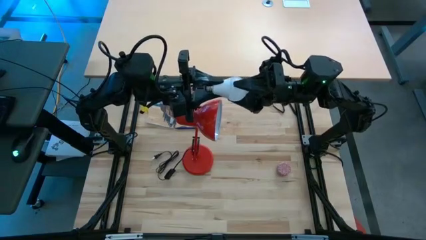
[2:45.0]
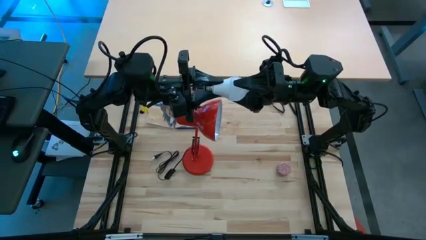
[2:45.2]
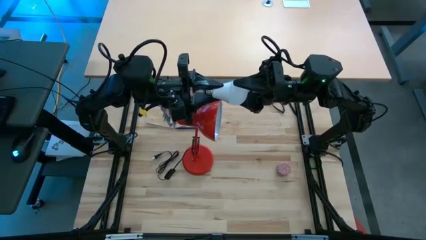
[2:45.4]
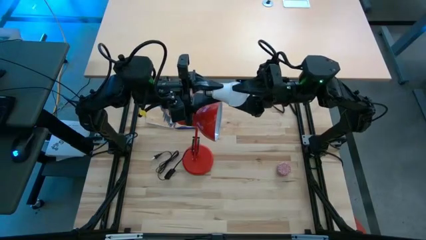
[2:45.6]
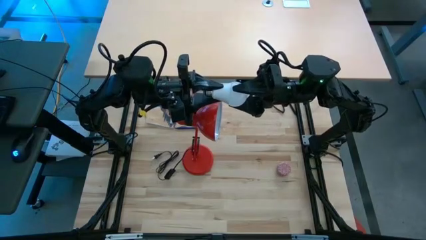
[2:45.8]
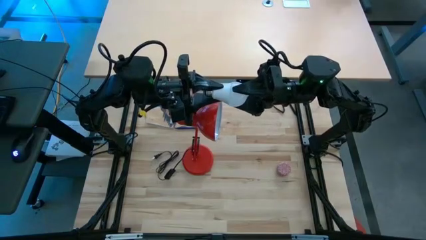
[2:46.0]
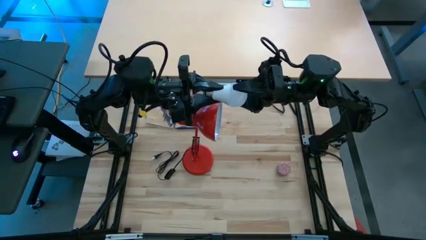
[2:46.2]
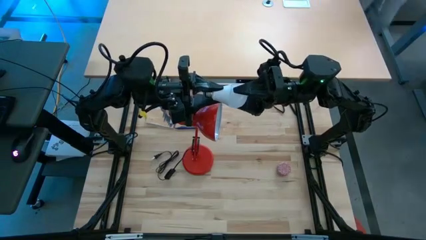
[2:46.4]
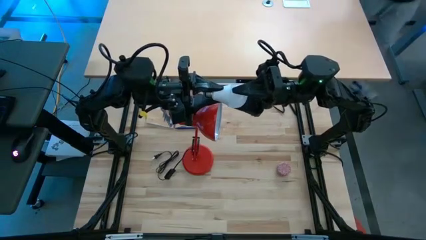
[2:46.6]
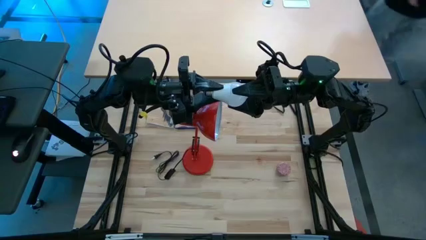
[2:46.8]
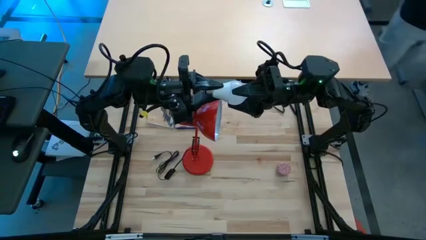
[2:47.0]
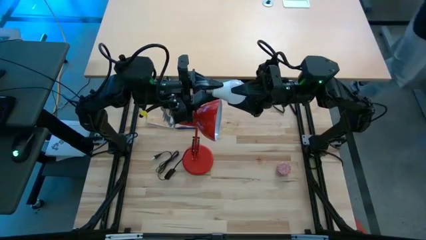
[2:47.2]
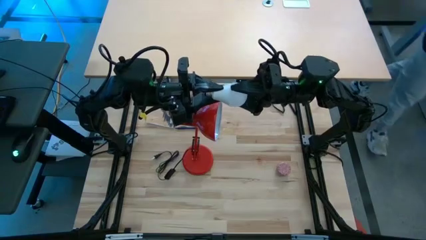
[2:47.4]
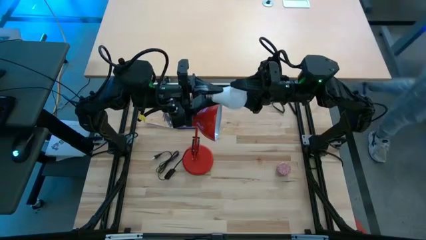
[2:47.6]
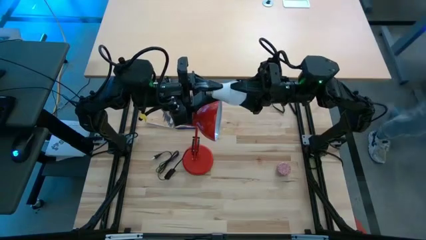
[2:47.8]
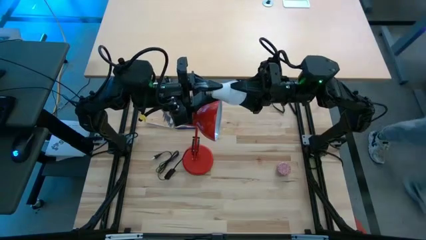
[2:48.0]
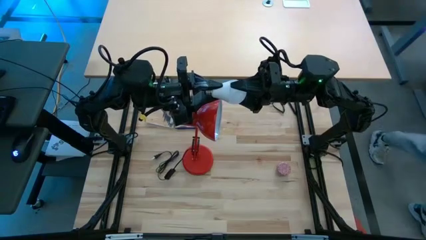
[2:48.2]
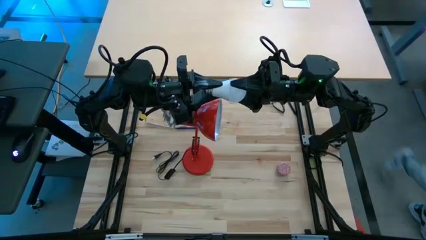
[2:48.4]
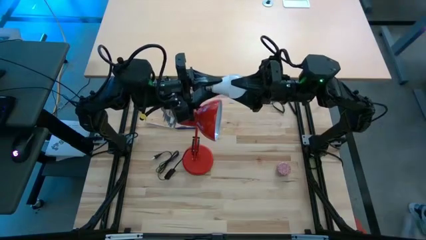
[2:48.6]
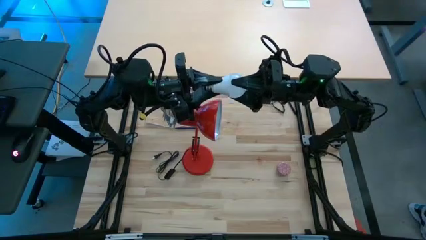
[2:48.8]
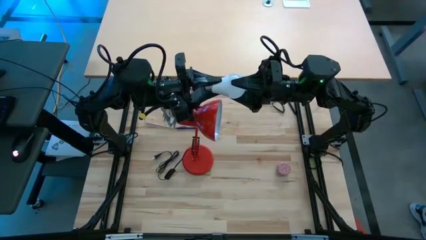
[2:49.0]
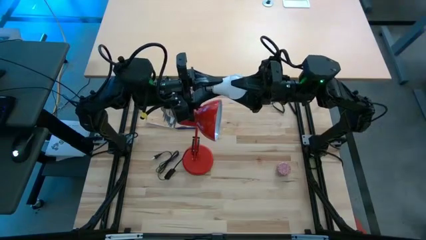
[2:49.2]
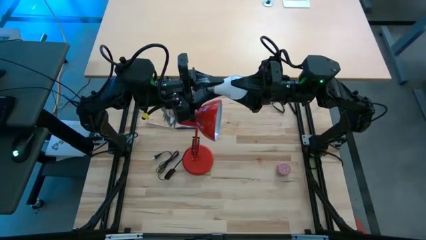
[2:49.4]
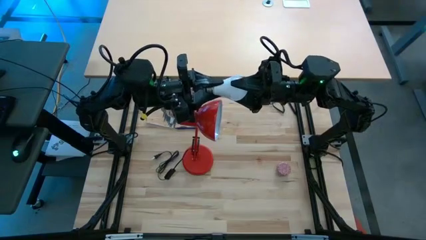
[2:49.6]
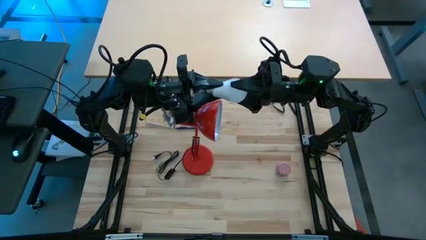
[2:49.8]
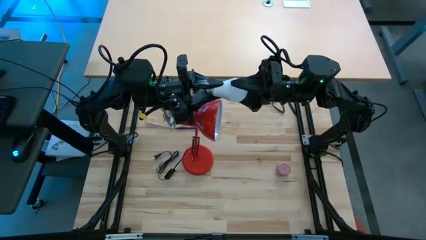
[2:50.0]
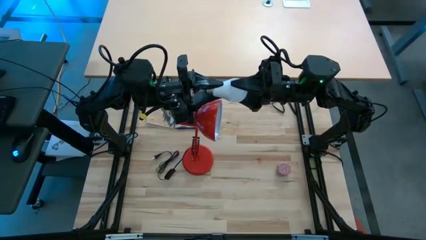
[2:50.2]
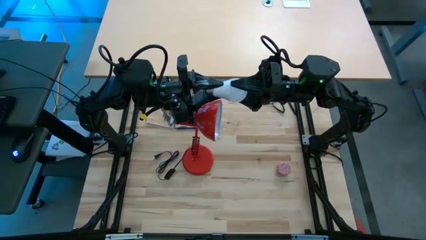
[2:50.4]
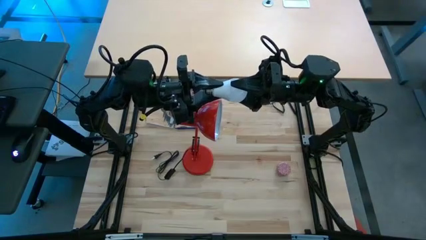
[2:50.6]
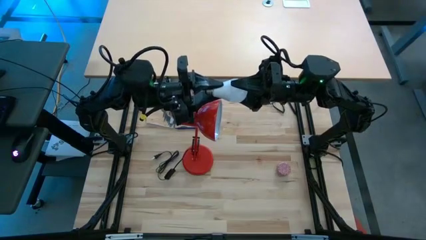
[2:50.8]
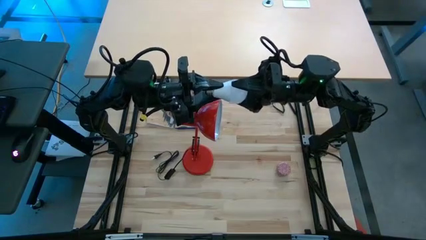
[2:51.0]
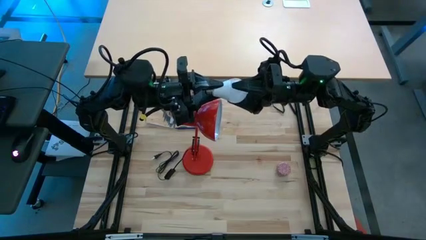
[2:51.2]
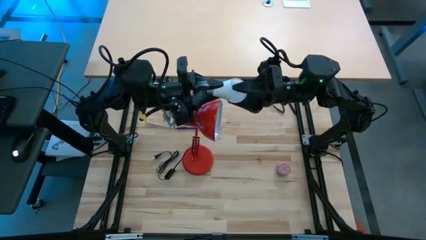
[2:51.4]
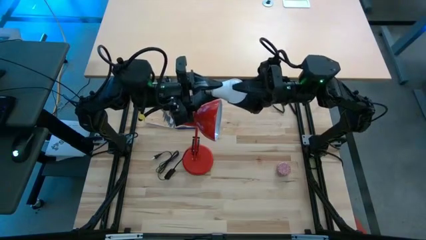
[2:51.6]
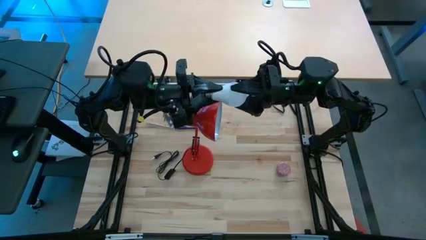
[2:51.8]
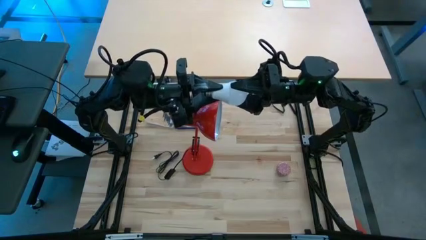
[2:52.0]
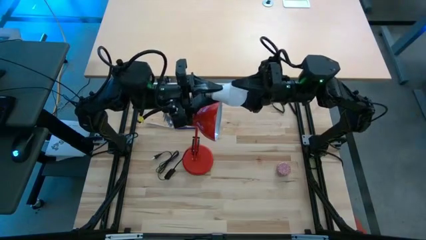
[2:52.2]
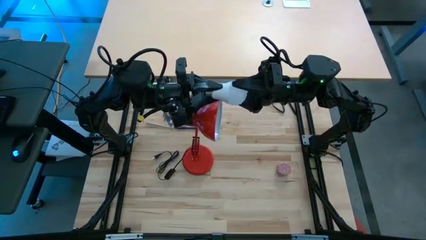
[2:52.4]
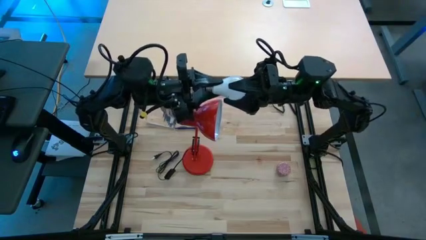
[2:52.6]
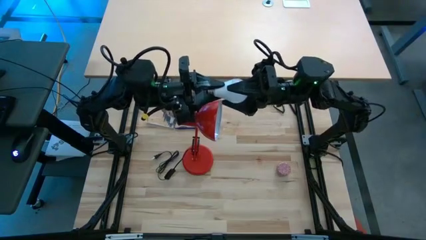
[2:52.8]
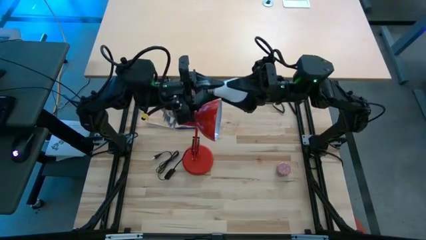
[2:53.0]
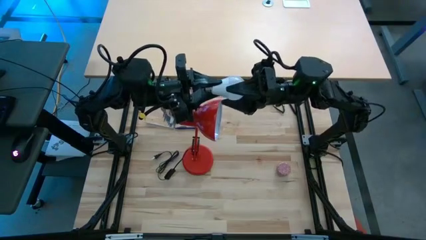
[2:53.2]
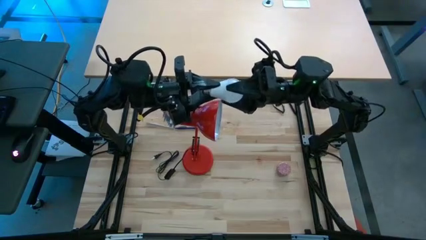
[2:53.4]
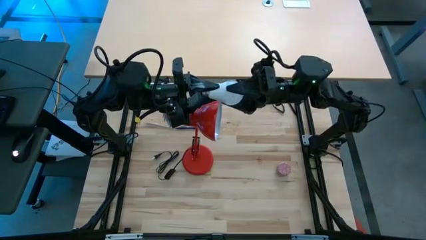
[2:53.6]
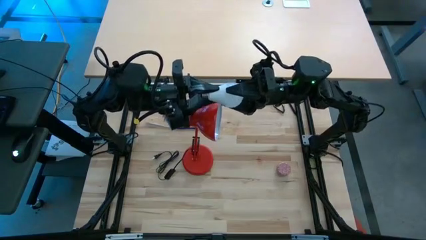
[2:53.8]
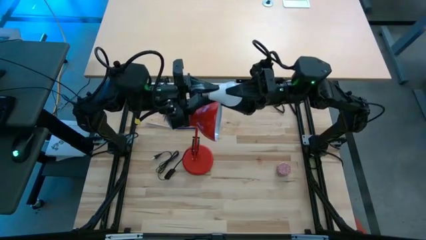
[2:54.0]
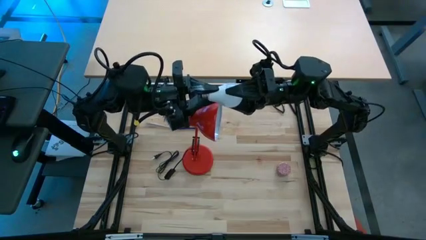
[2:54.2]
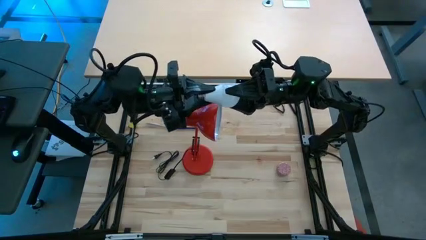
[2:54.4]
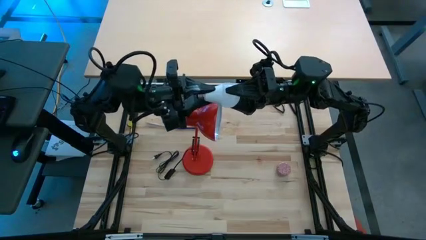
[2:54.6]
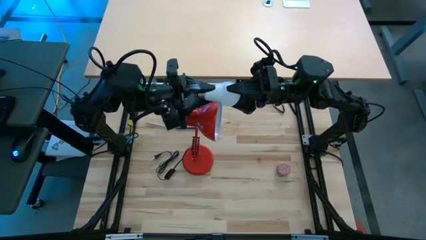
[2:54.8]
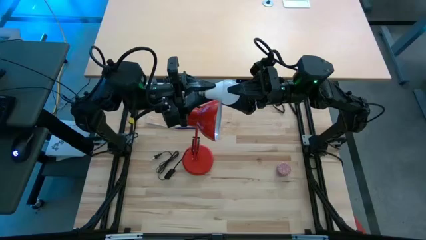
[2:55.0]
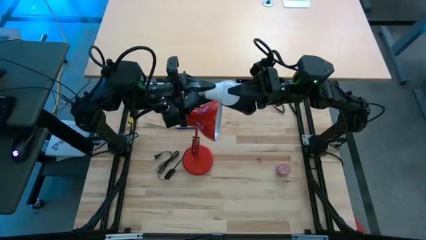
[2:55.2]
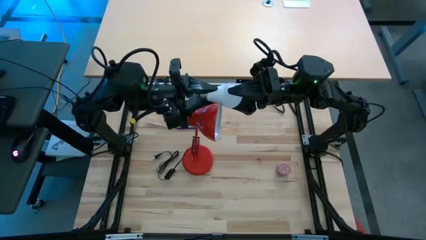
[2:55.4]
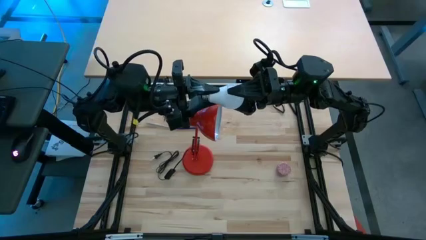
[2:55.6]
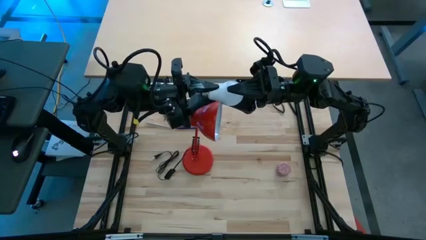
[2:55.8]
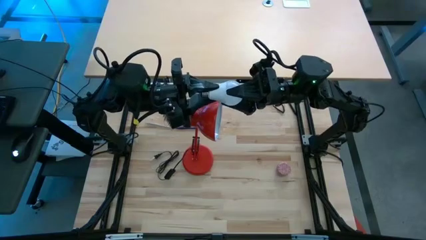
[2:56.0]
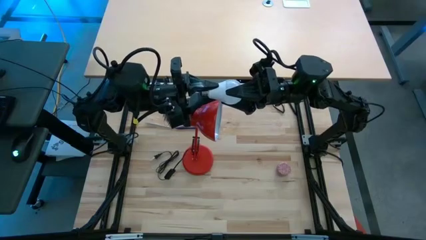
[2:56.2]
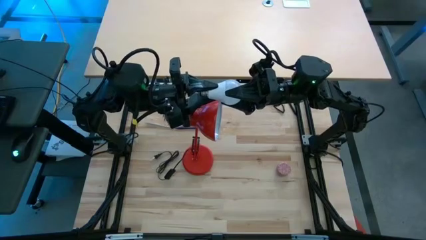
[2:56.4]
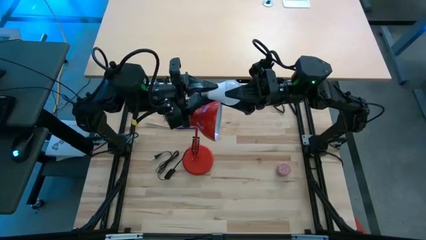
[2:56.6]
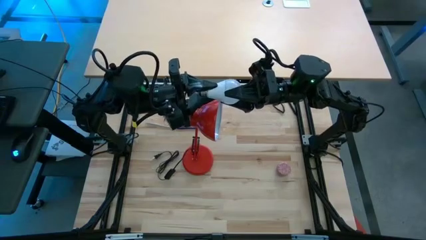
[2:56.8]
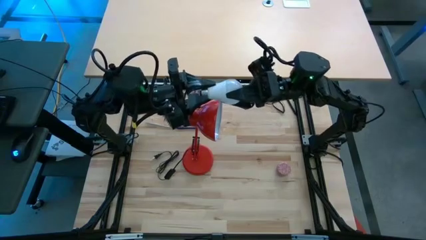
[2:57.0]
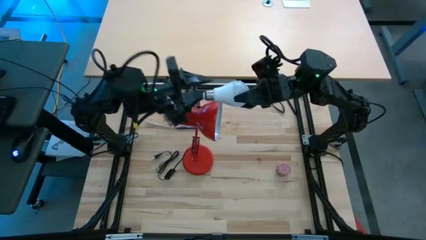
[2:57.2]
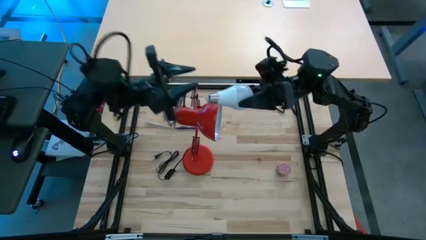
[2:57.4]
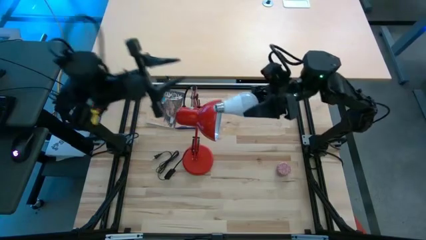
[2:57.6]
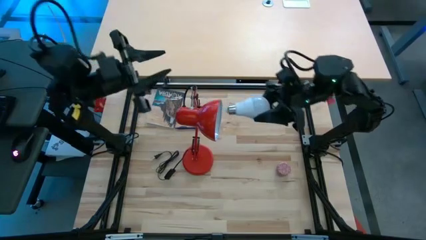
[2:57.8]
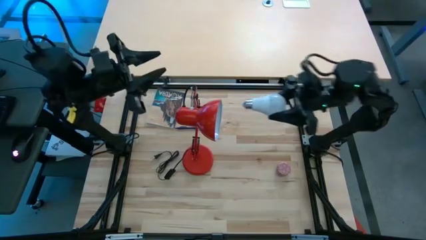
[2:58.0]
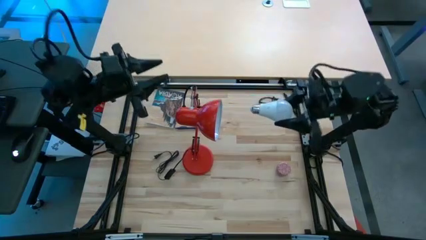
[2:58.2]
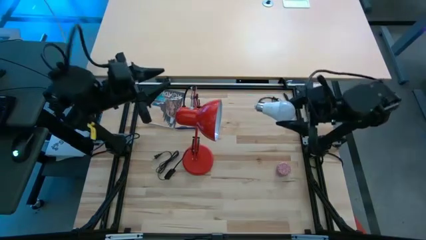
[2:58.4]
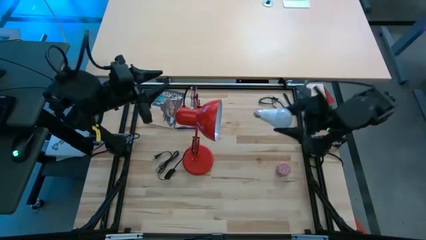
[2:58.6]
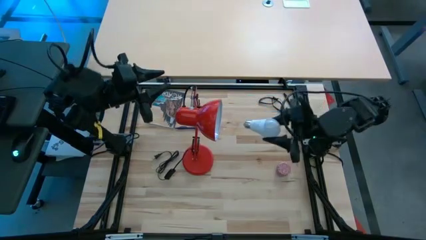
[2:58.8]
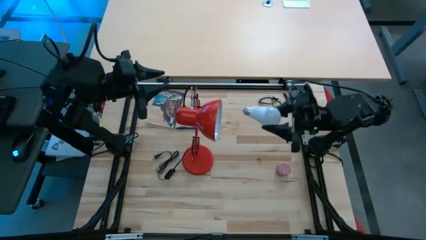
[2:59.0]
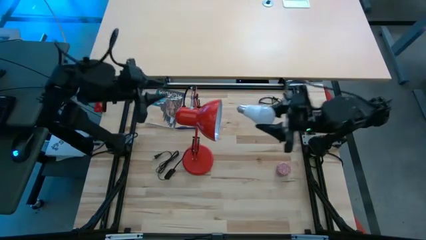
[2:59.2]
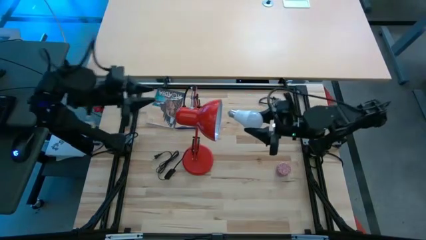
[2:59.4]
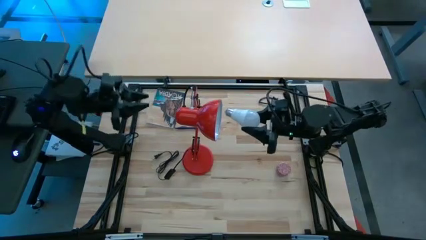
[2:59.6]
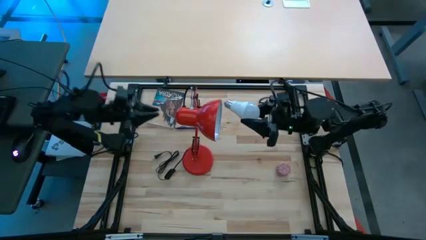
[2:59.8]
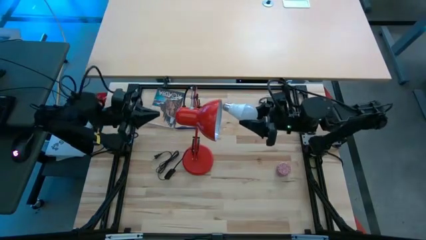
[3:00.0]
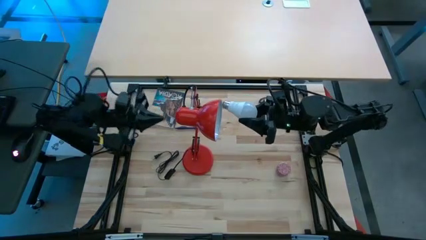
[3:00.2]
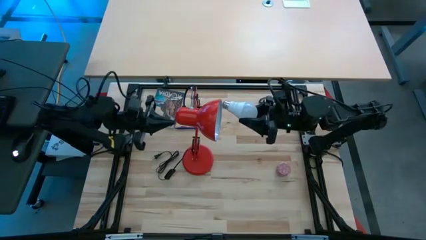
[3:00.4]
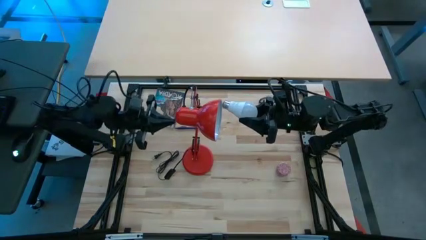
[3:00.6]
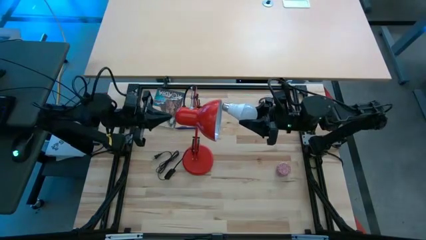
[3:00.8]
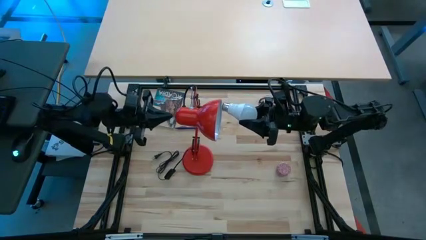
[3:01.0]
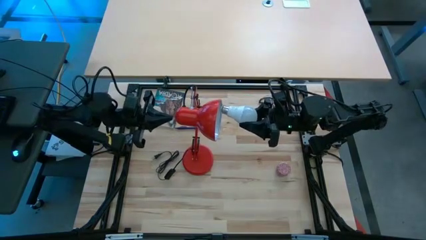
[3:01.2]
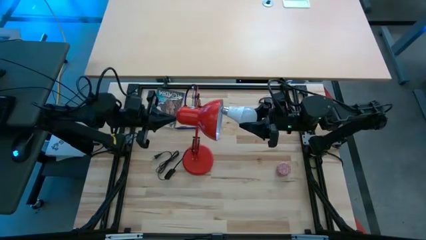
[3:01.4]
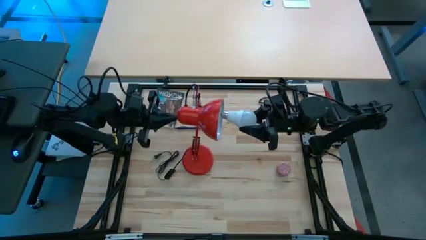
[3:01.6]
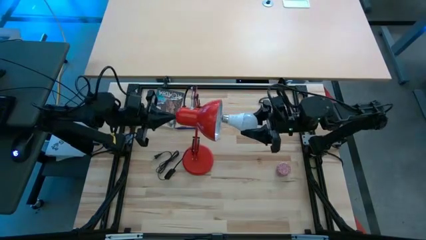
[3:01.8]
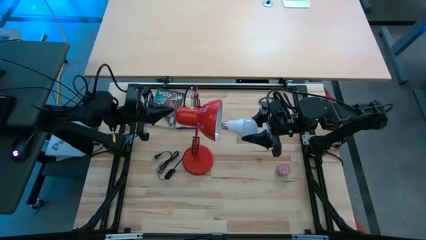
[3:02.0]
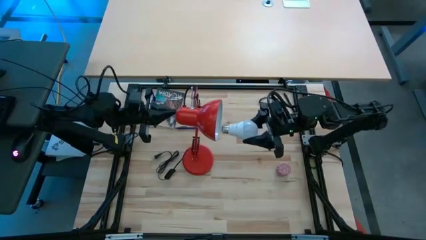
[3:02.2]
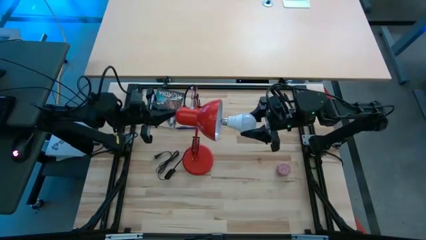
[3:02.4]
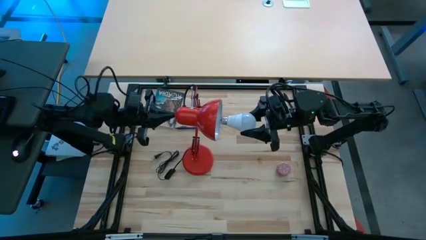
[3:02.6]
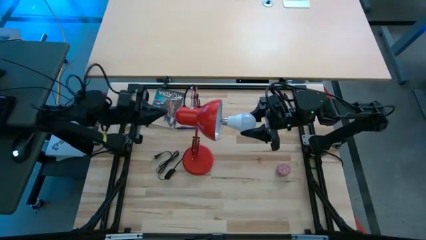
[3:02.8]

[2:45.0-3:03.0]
Task: Screw lightbulb
Insert the lightbulb on the lamp
